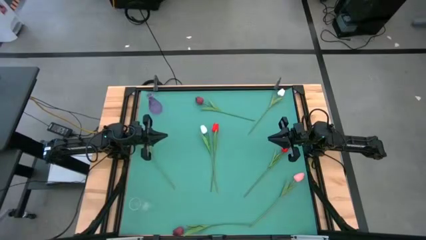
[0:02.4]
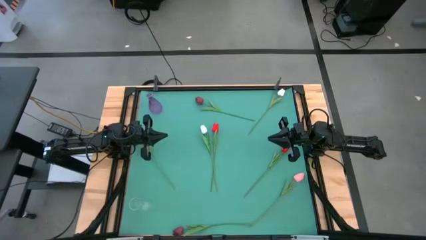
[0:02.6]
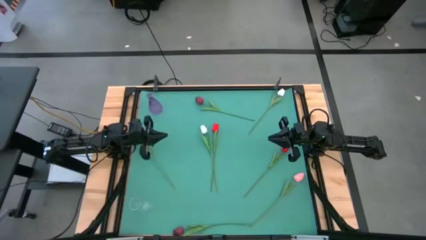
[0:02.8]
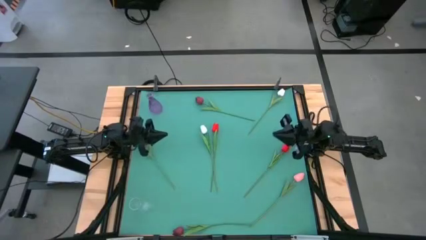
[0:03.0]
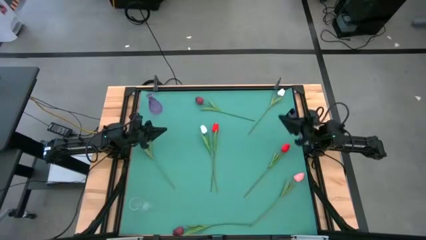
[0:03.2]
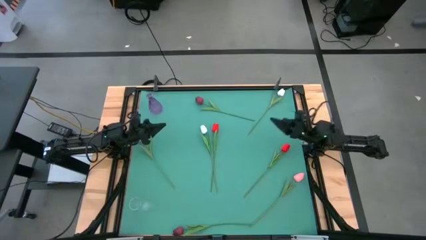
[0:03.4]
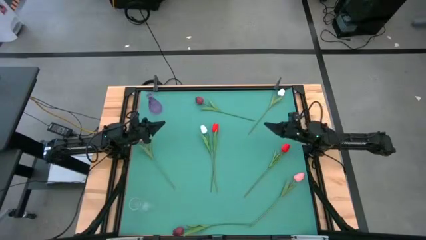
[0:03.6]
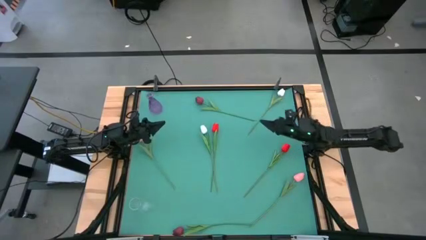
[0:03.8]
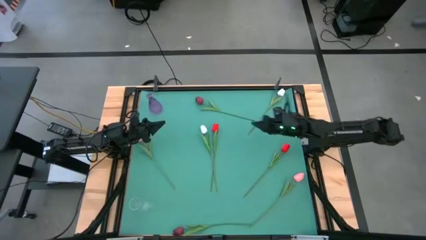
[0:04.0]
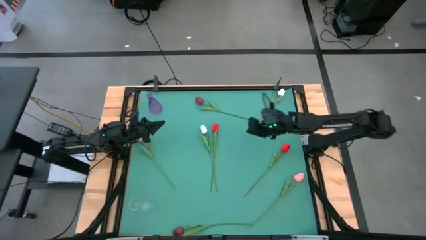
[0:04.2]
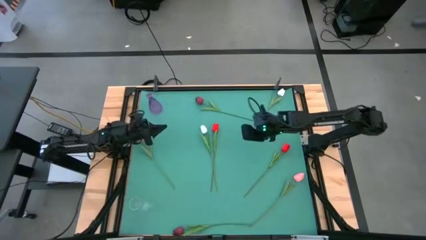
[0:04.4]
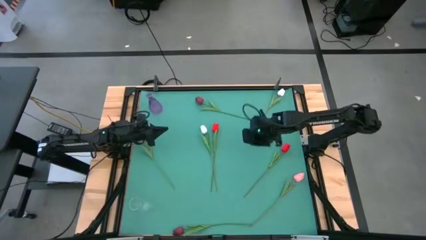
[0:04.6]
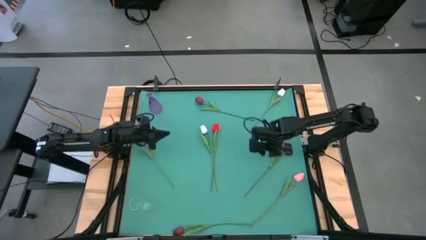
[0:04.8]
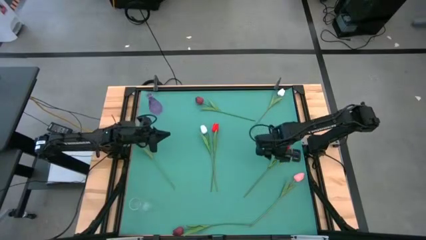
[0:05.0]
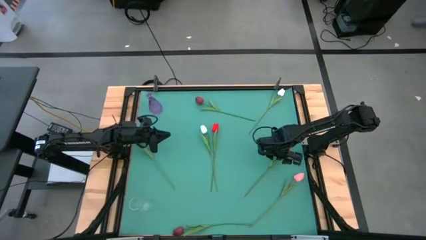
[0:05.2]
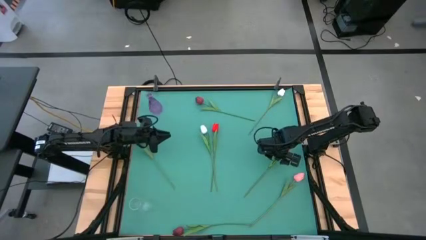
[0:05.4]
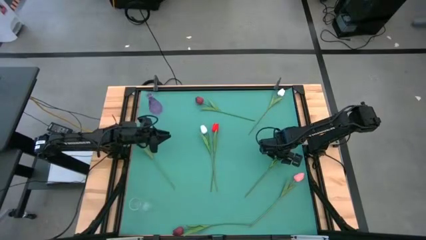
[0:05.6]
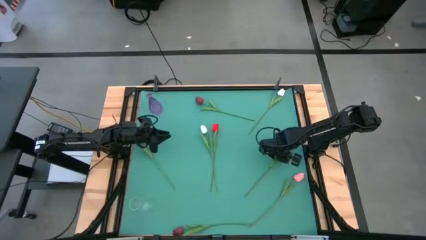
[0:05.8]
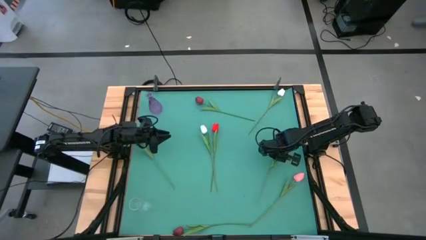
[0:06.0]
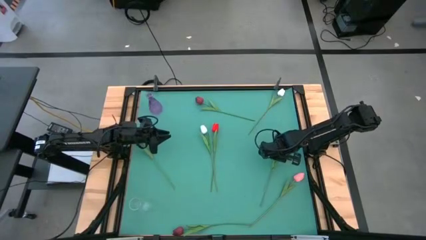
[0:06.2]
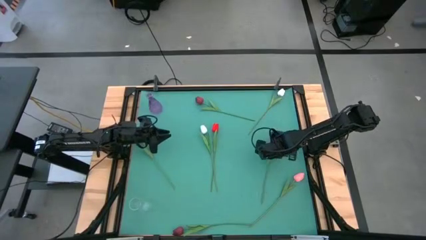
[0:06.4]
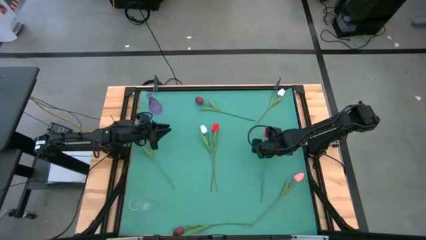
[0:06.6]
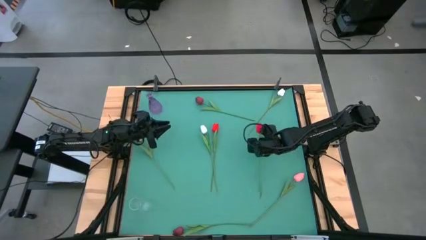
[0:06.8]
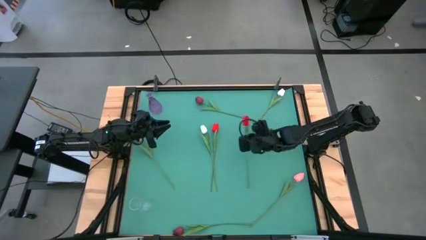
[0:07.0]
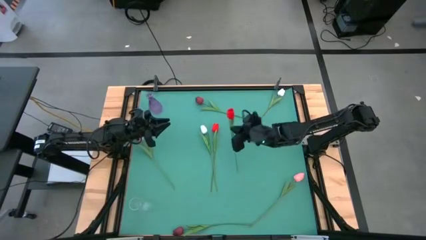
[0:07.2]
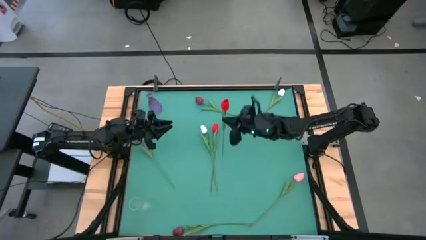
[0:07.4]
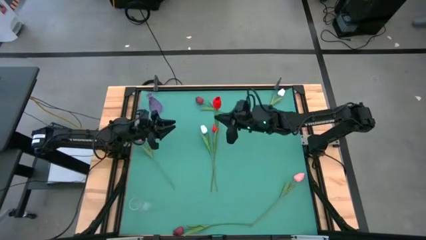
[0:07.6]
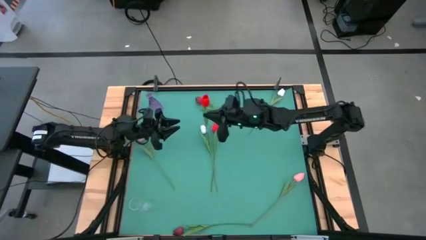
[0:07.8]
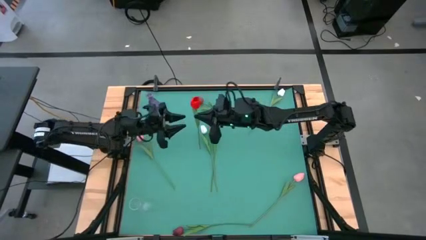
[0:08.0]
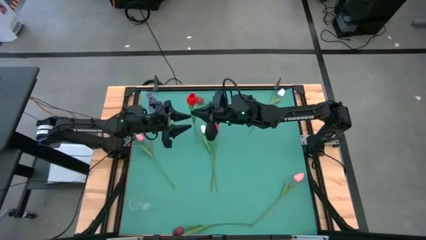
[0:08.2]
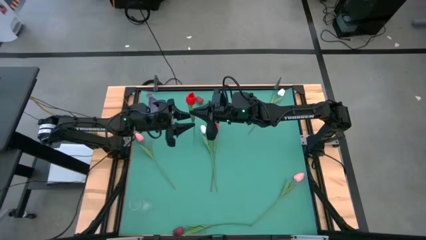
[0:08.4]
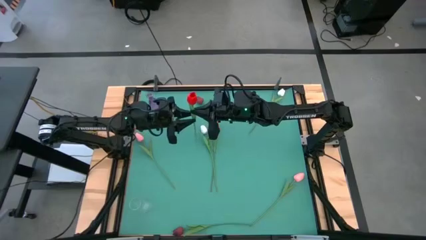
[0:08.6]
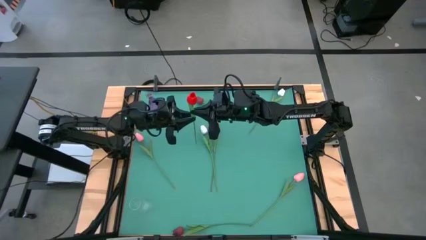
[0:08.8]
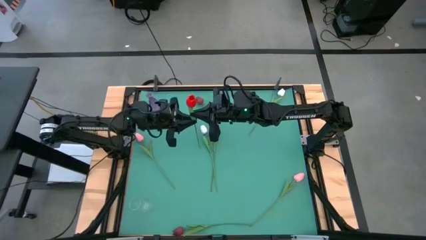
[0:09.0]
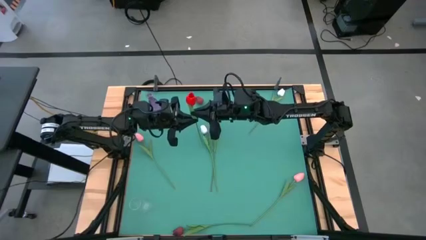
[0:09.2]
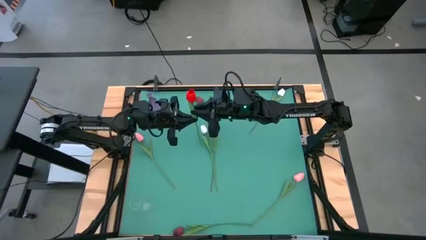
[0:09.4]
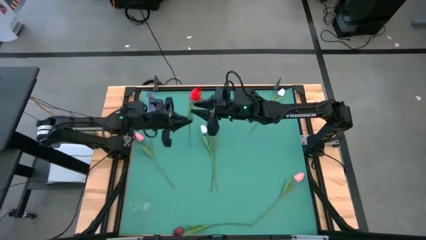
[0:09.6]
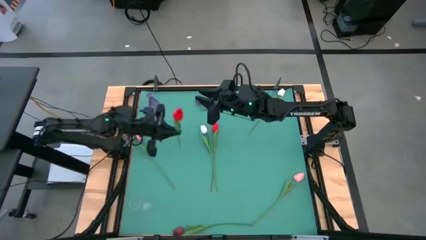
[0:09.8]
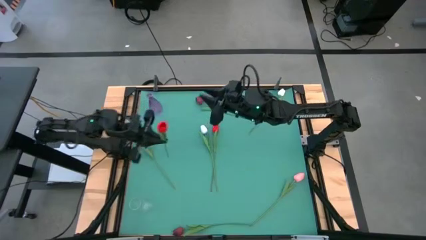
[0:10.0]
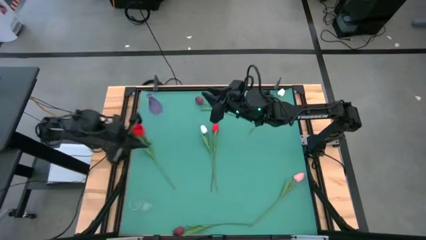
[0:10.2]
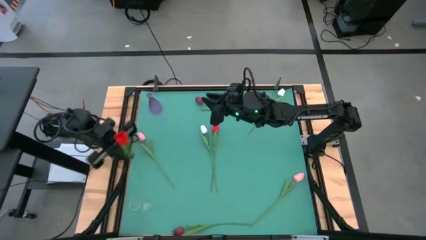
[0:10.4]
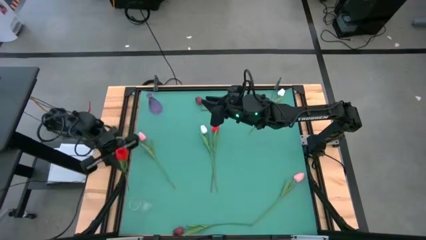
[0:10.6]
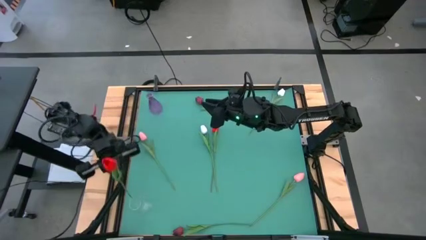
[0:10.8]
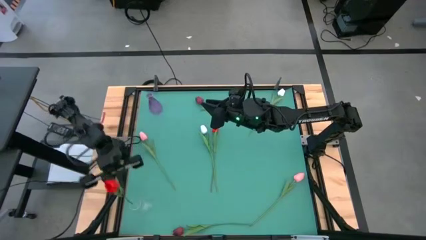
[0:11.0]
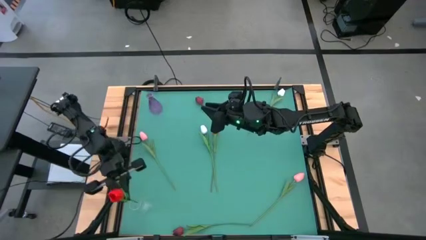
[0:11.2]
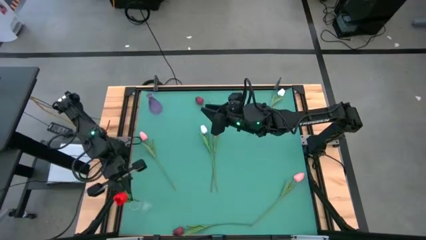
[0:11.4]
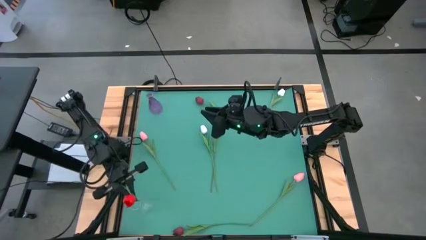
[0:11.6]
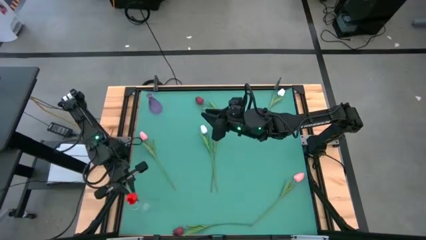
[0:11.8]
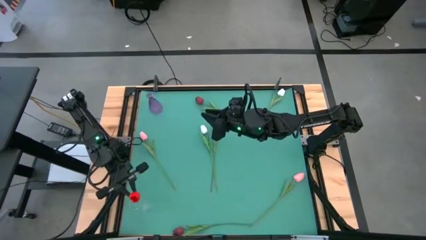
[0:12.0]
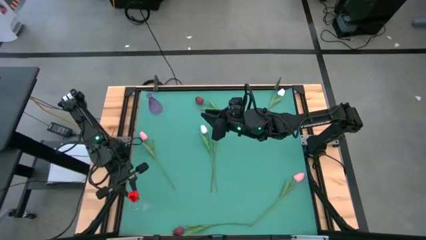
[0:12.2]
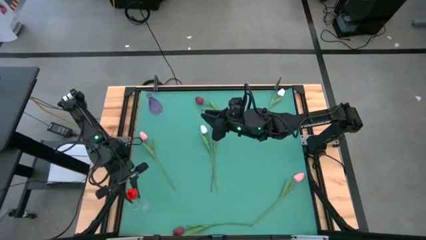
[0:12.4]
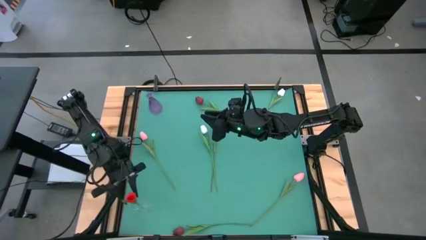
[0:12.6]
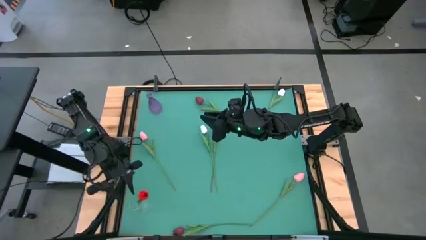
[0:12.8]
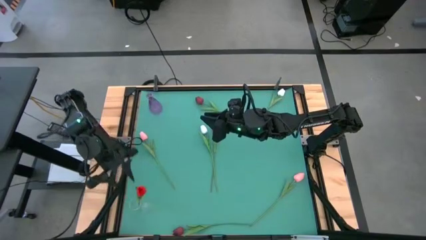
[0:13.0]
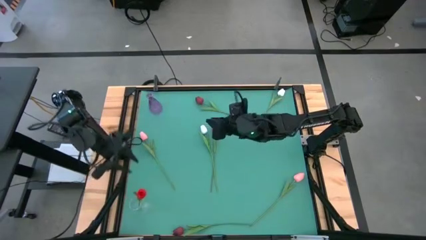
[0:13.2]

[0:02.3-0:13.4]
Task: Sort flowers into vase by color
Put the right red flower into the transparent vase

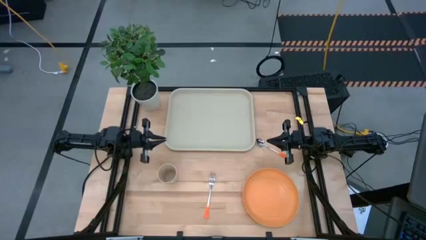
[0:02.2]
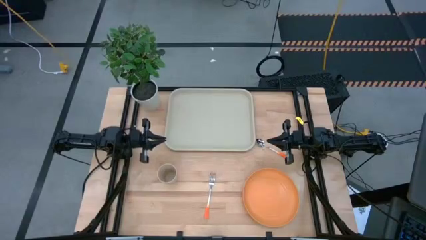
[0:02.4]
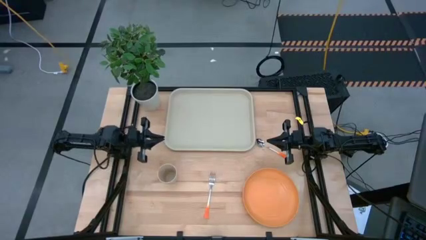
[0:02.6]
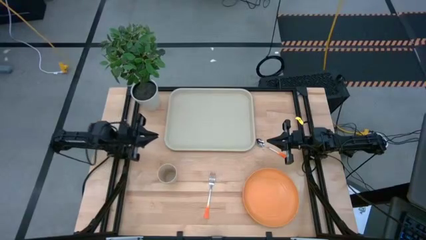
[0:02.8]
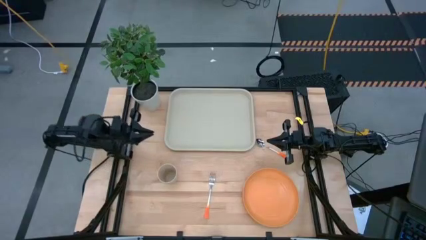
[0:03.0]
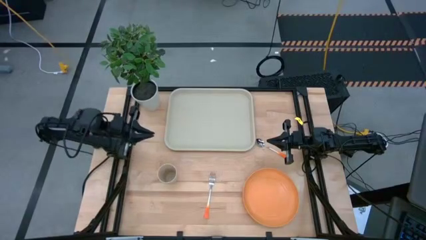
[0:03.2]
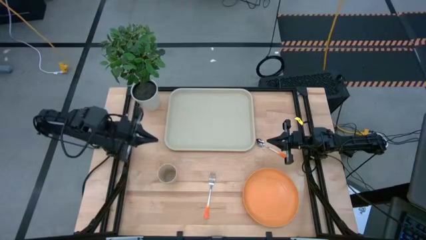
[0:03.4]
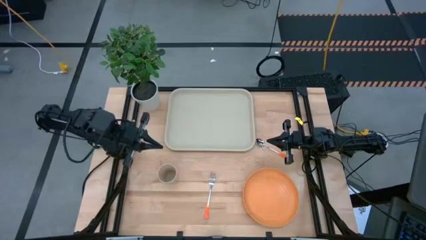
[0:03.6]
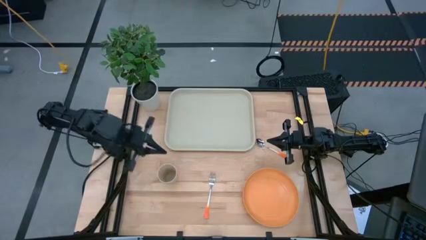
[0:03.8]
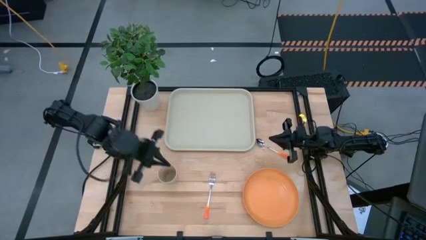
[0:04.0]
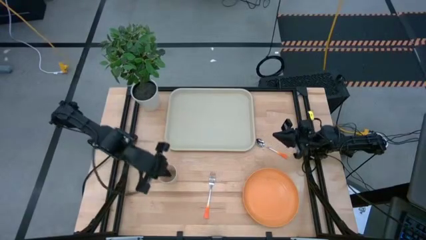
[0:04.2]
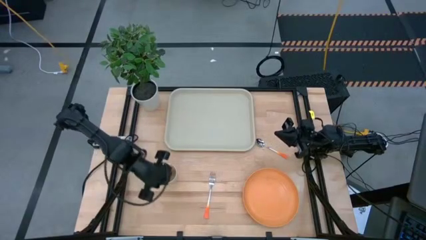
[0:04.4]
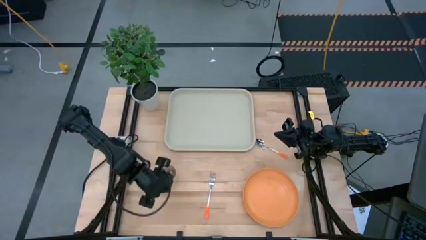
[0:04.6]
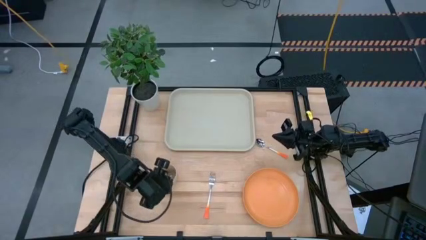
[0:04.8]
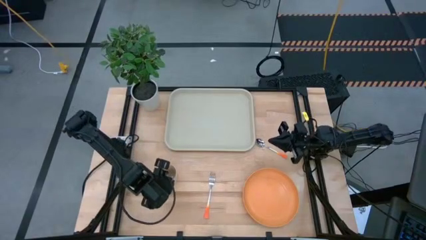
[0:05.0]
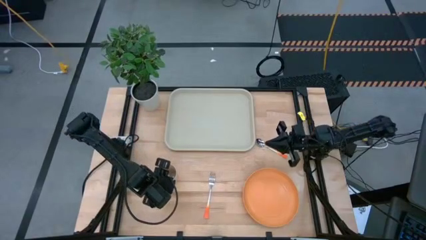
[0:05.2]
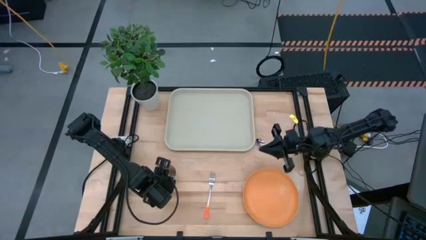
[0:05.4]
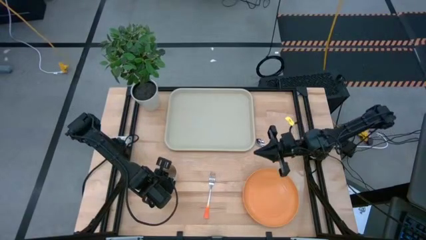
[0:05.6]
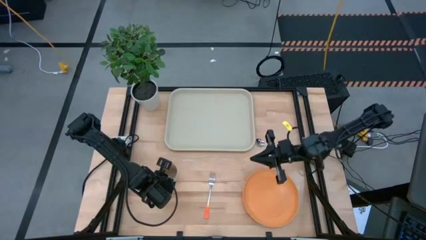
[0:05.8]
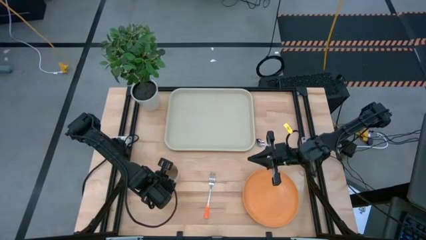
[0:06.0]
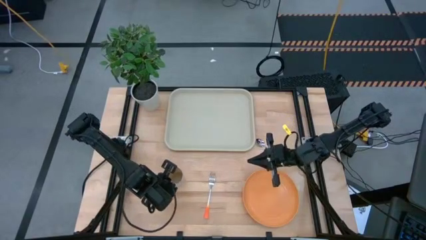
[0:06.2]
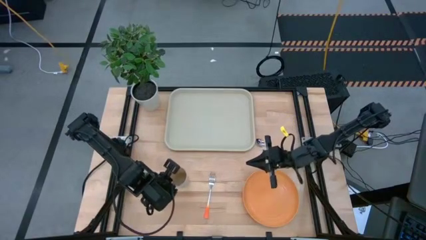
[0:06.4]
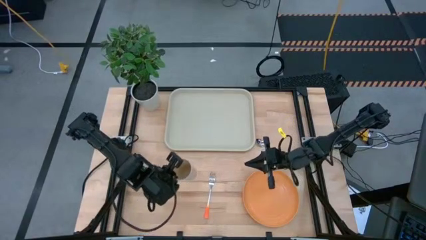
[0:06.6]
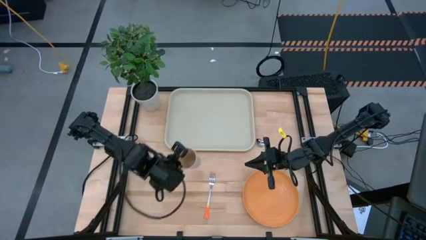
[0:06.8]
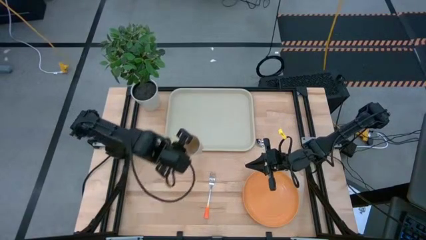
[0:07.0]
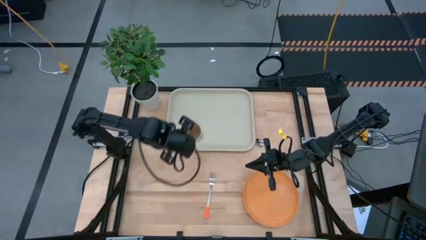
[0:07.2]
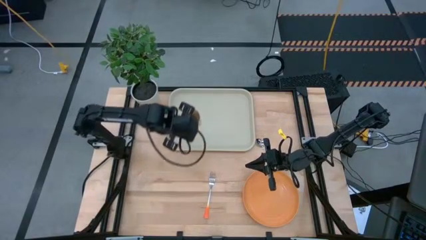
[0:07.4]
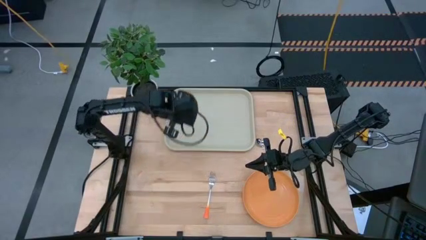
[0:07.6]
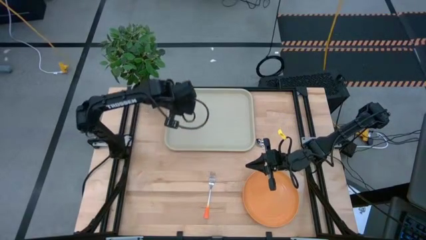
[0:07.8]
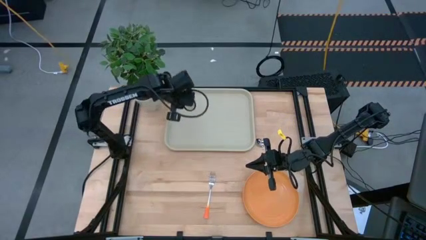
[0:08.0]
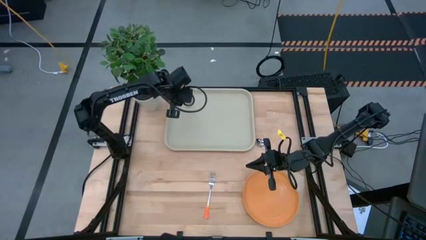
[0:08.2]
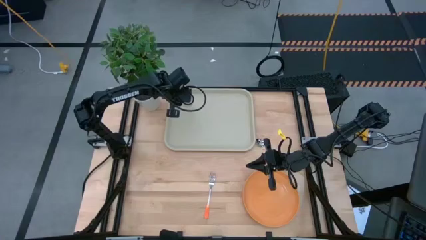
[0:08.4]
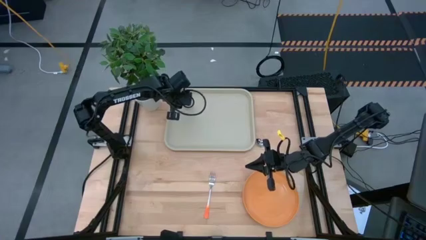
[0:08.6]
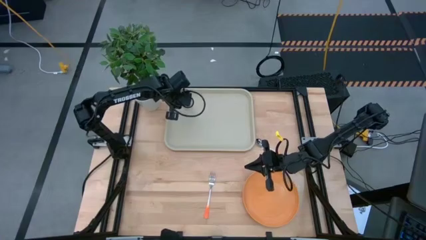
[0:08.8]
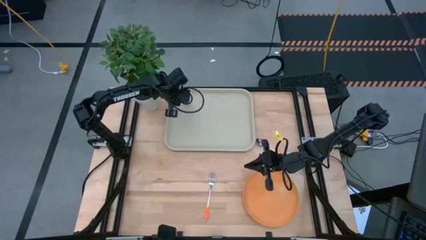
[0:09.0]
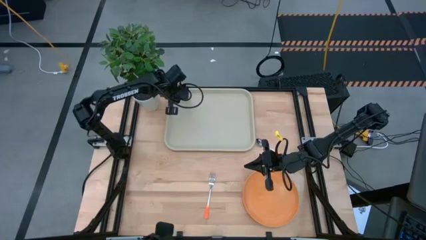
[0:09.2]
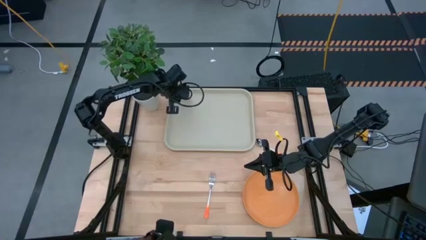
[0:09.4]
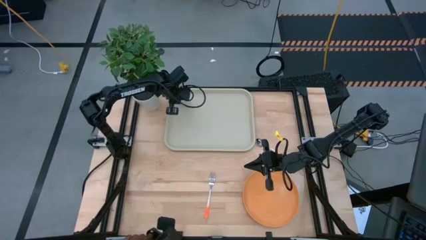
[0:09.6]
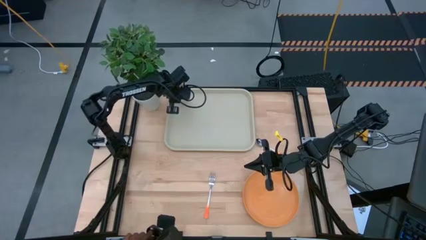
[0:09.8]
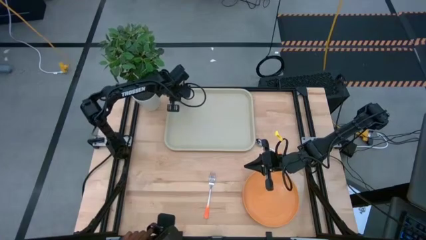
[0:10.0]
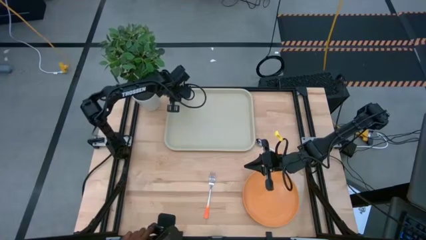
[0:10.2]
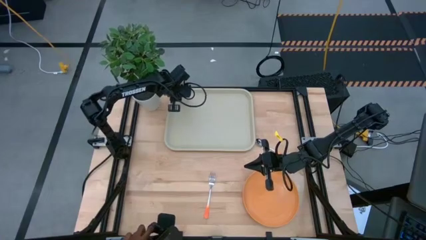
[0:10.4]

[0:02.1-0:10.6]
Task: Pick and place plate/cup/fork/spoon on tray
Put the brown cup on the brown tray
